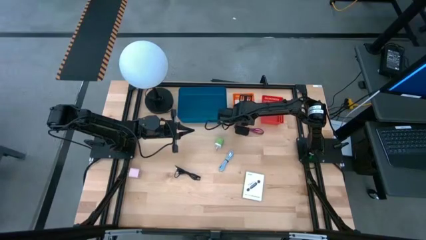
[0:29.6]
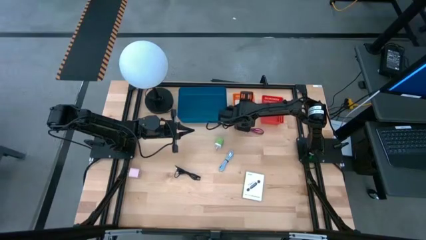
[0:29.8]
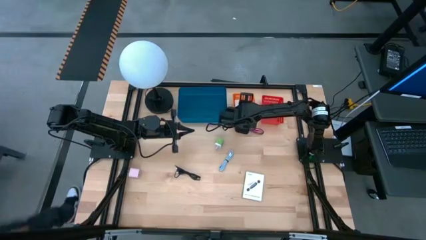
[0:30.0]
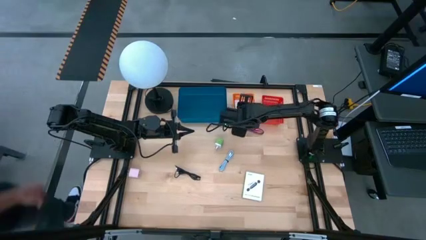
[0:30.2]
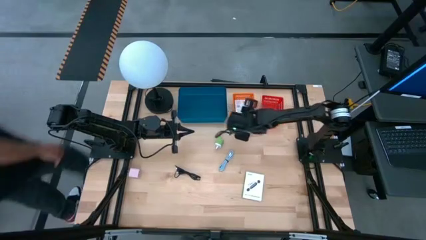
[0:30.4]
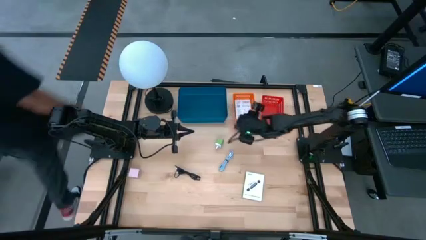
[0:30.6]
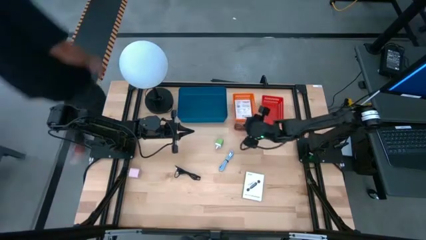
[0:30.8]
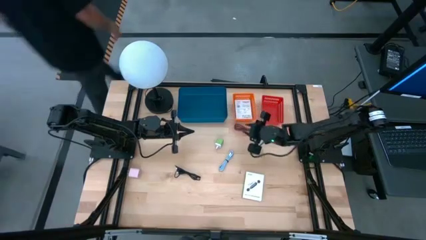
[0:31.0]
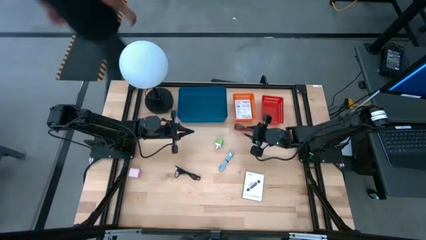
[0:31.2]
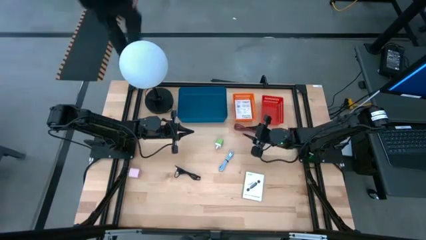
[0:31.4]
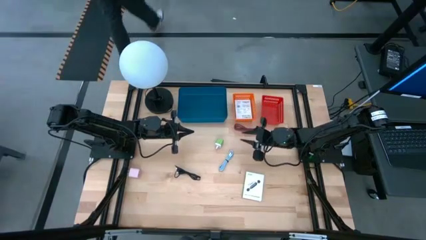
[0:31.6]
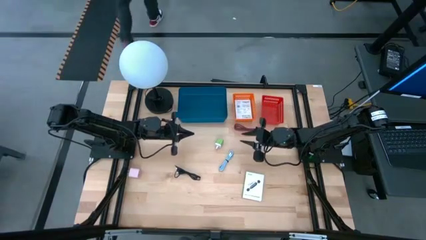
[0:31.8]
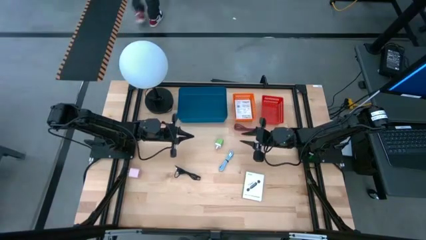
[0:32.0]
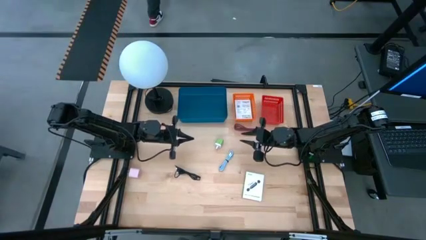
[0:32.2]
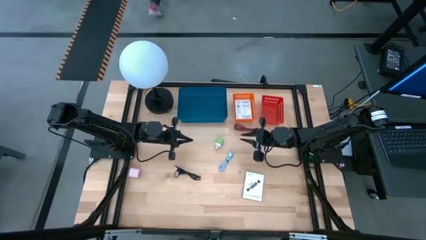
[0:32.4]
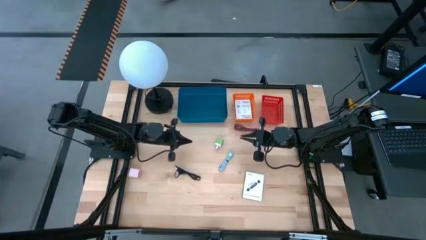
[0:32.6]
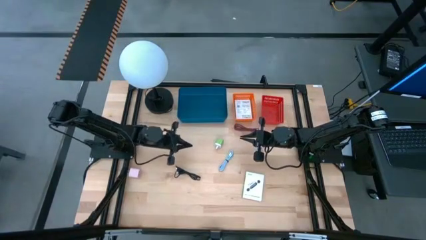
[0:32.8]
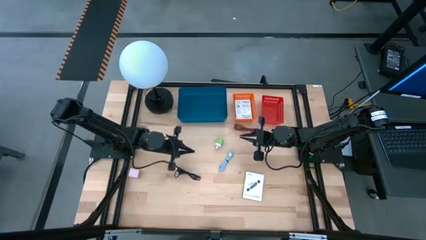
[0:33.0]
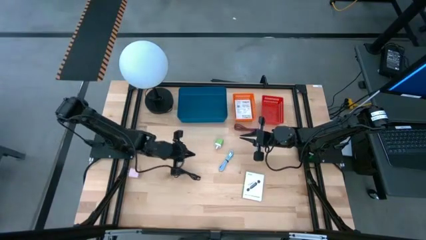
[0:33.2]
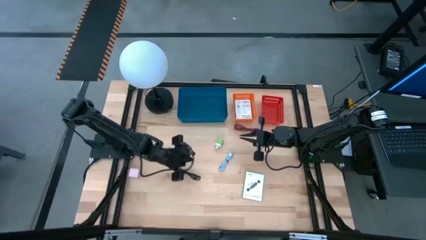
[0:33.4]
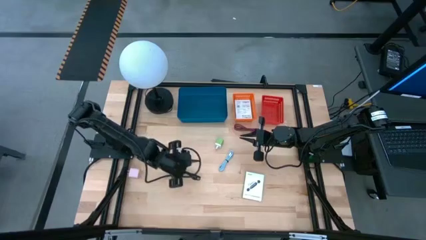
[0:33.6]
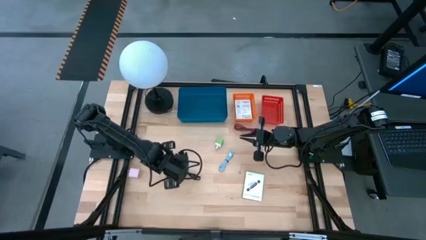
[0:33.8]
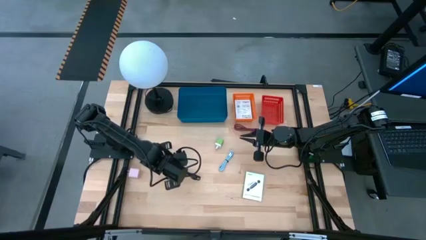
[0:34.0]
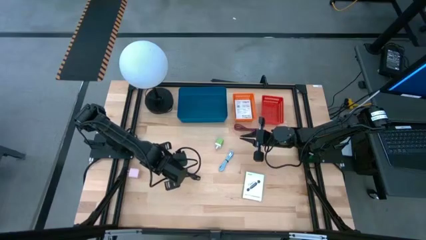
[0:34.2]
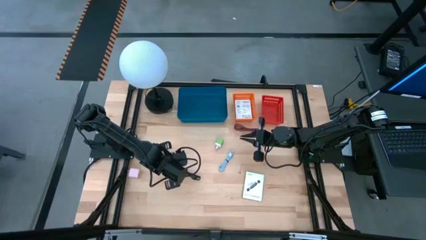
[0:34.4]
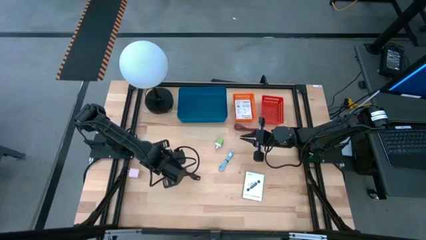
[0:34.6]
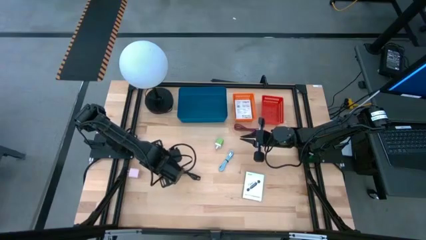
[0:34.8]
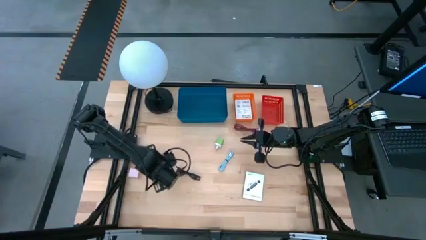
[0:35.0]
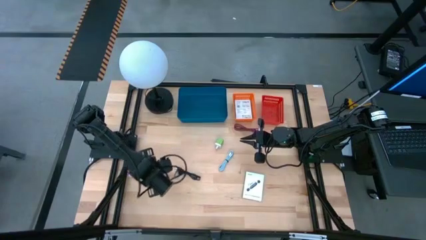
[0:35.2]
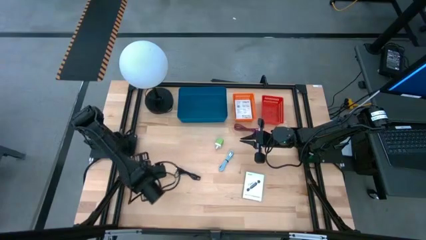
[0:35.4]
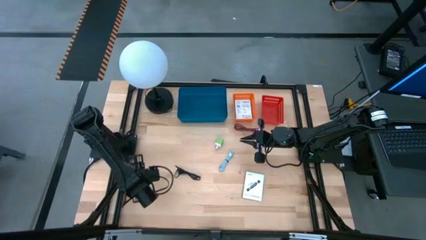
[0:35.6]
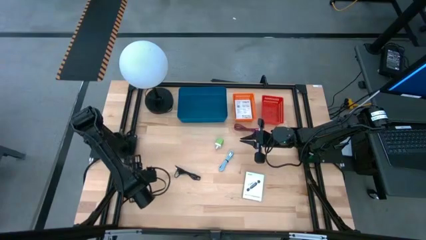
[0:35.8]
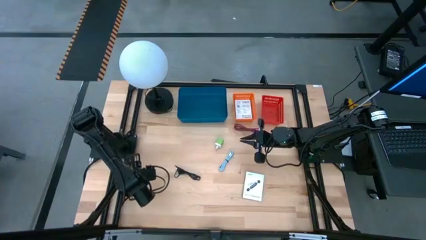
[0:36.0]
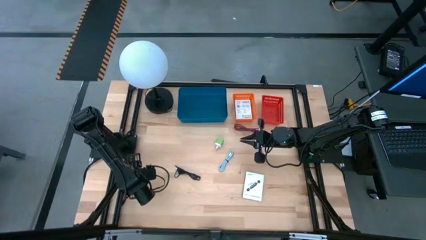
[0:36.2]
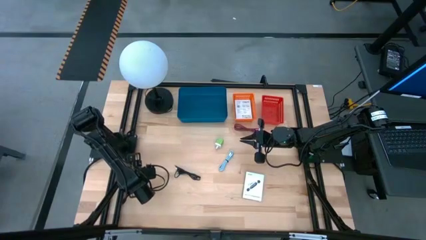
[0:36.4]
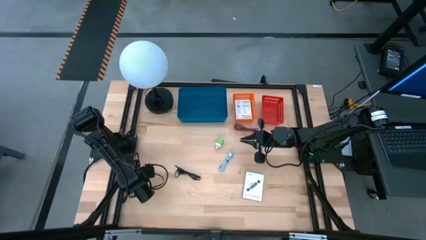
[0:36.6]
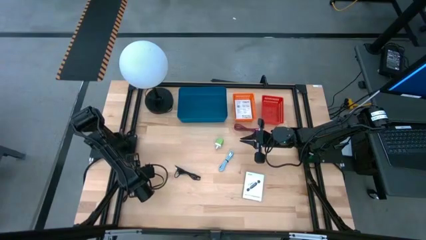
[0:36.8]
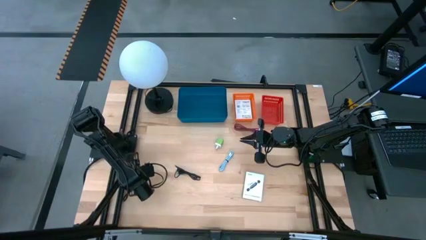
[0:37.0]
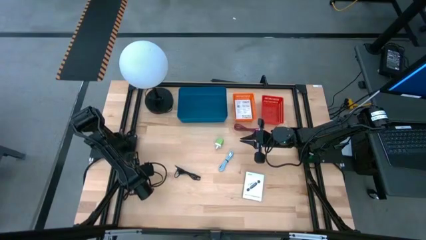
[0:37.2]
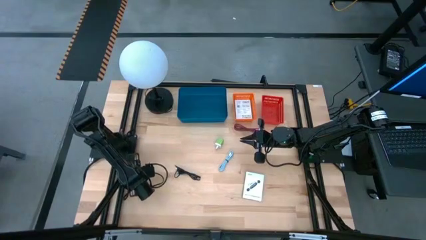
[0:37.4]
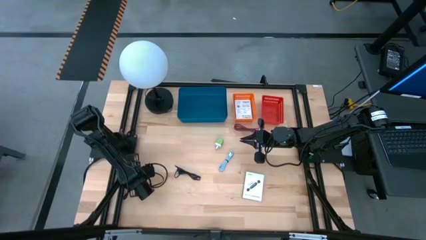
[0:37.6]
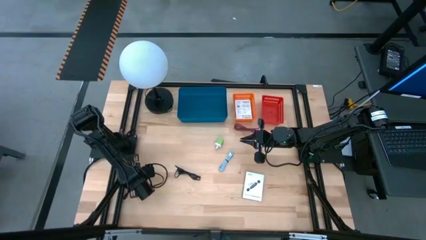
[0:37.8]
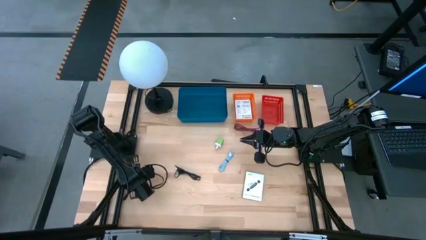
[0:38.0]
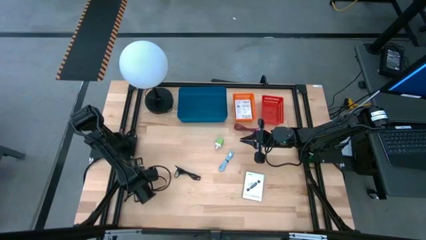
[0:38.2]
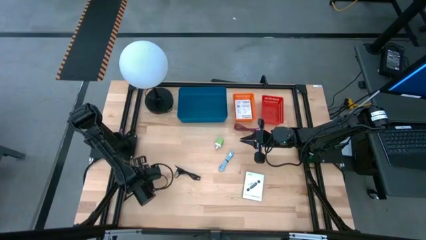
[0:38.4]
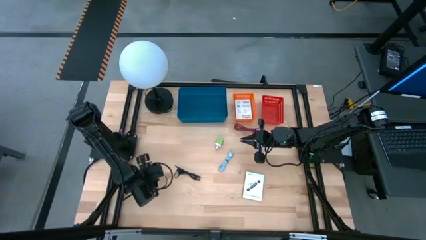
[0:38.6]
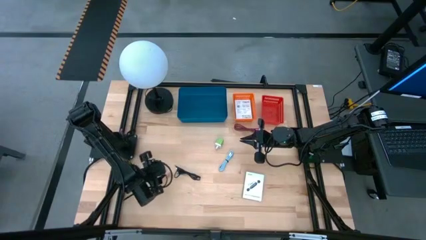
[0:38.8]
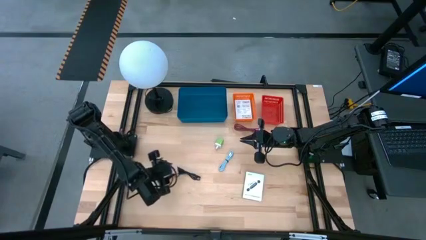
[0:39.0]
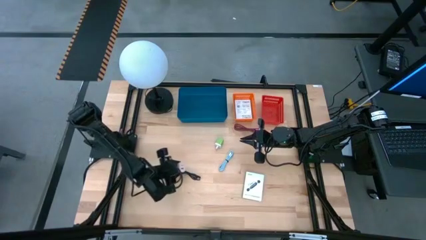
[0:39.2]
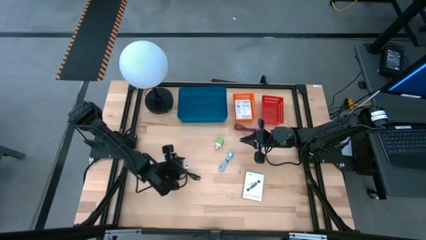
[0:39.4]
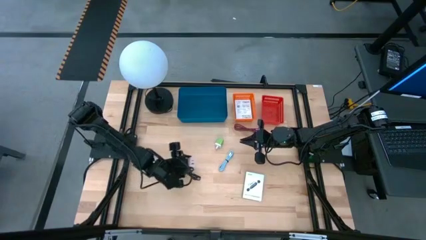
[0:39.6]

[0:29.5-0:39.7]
Task: Pick and place items into bin
Put the light pink charger adapter into the red bin

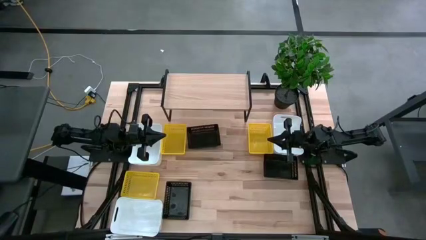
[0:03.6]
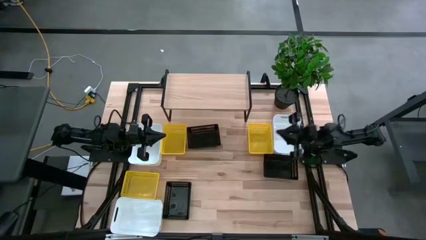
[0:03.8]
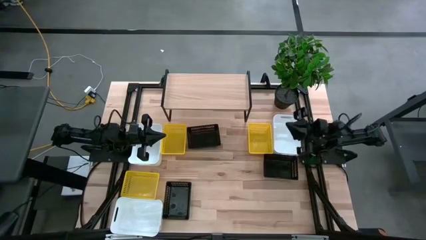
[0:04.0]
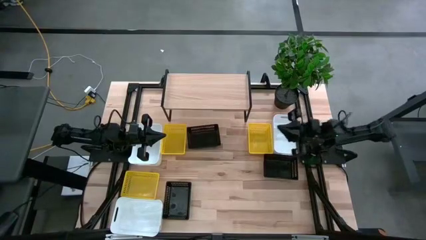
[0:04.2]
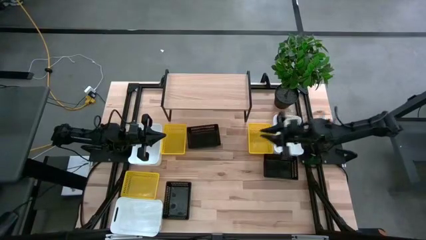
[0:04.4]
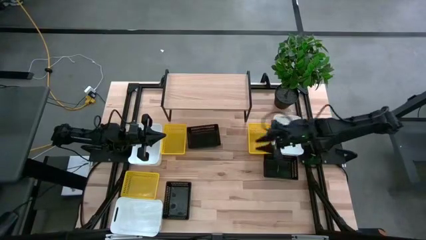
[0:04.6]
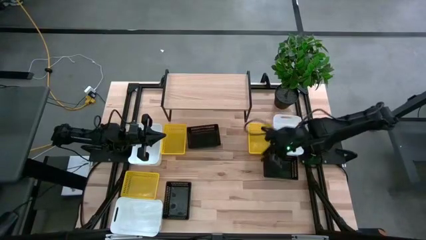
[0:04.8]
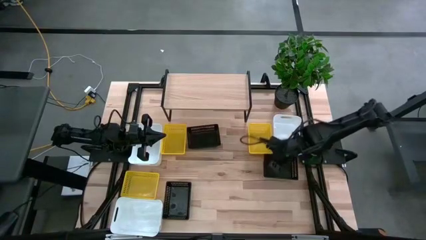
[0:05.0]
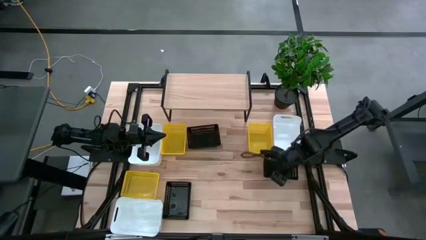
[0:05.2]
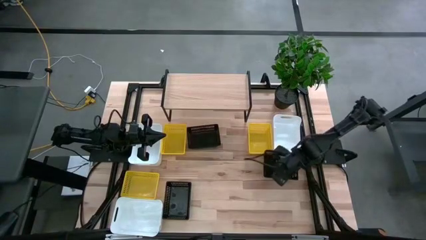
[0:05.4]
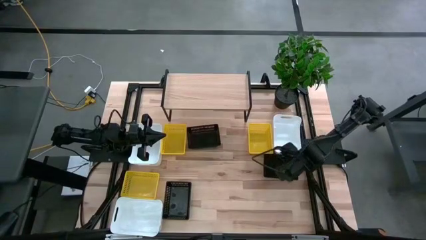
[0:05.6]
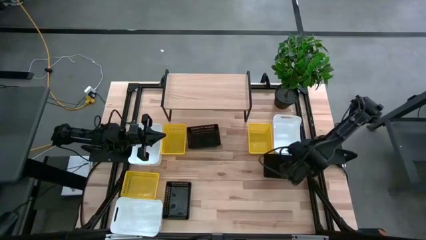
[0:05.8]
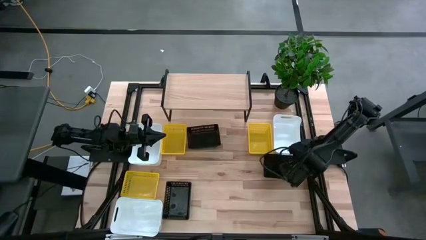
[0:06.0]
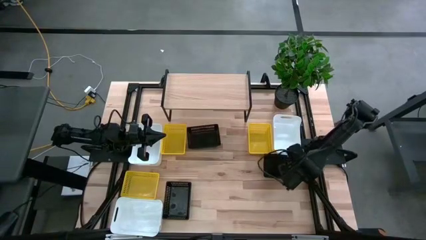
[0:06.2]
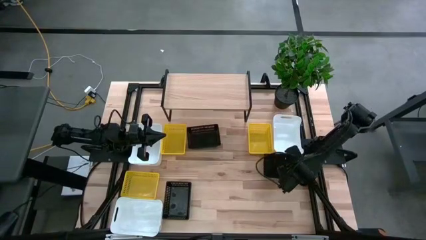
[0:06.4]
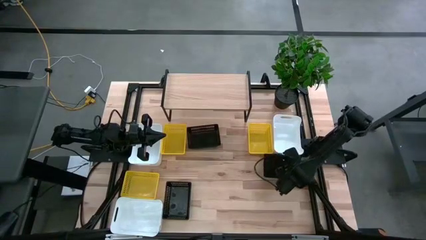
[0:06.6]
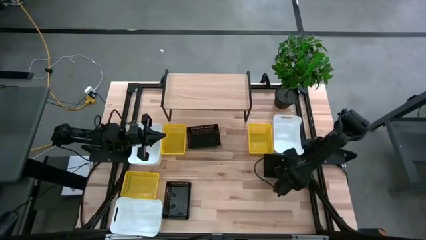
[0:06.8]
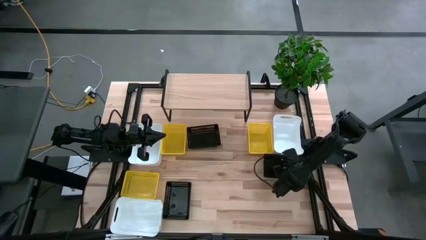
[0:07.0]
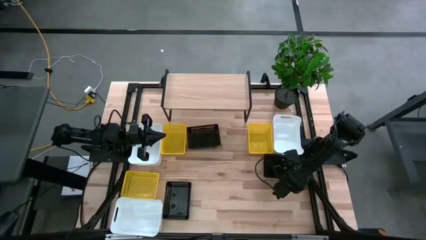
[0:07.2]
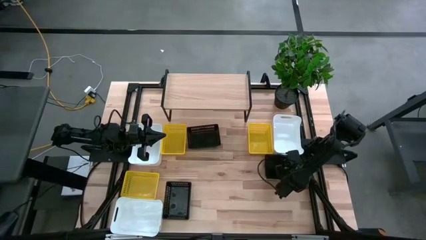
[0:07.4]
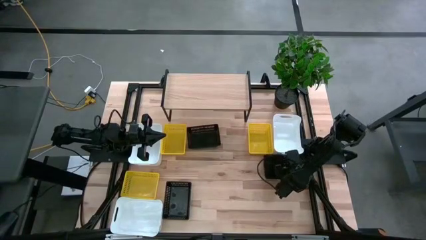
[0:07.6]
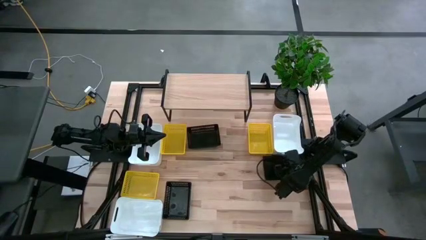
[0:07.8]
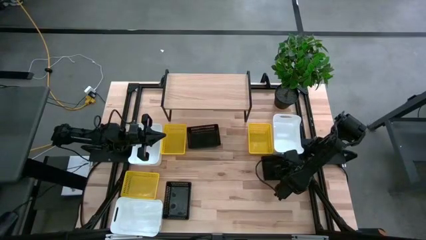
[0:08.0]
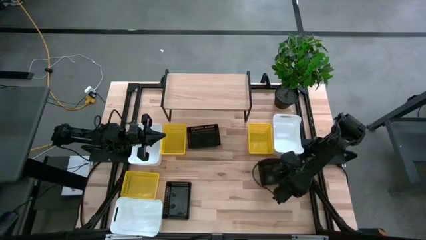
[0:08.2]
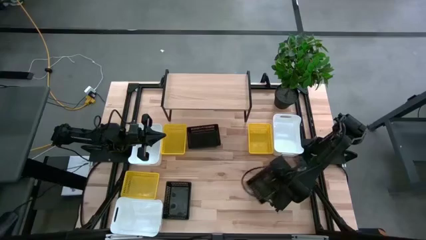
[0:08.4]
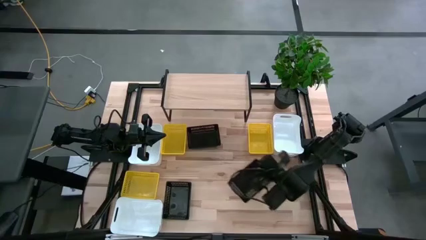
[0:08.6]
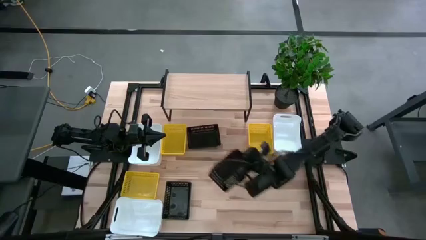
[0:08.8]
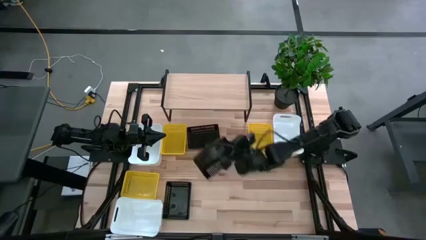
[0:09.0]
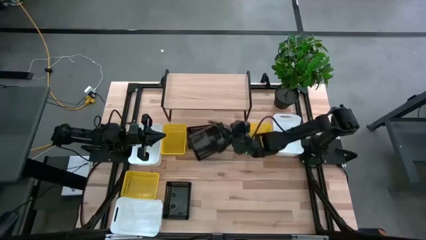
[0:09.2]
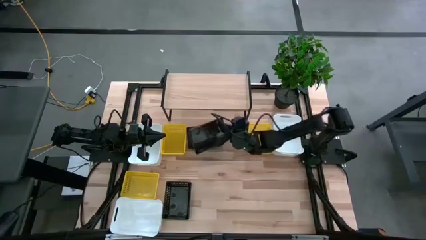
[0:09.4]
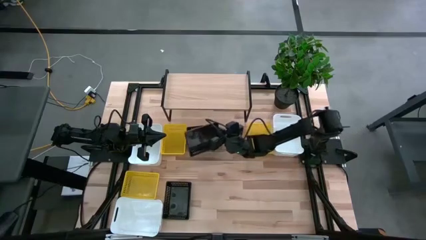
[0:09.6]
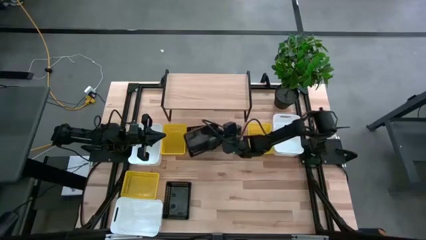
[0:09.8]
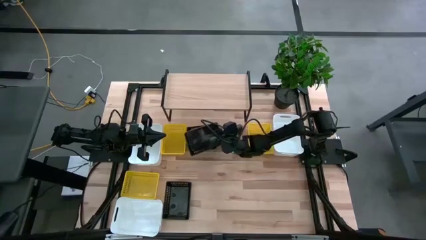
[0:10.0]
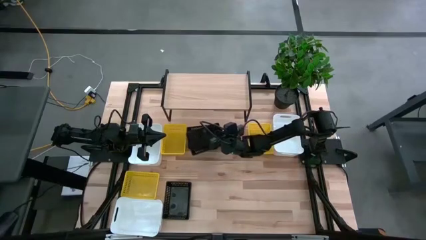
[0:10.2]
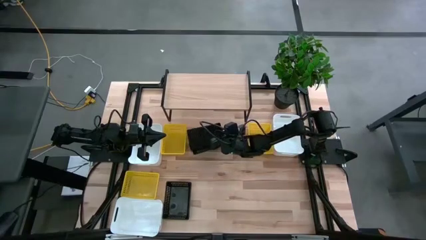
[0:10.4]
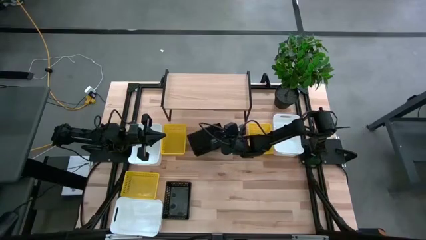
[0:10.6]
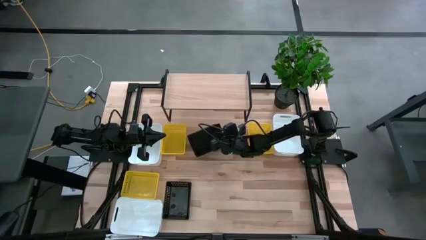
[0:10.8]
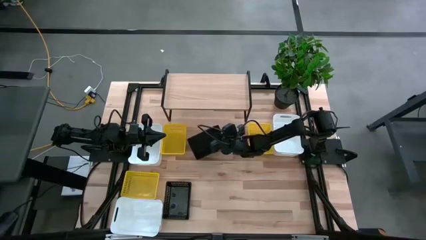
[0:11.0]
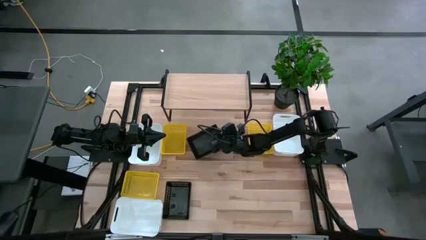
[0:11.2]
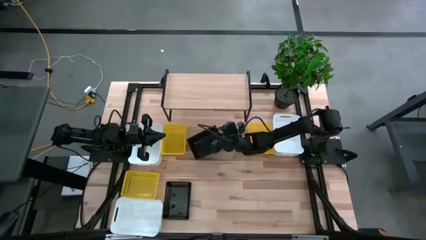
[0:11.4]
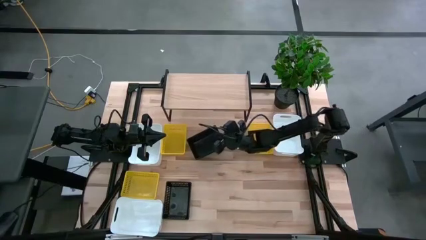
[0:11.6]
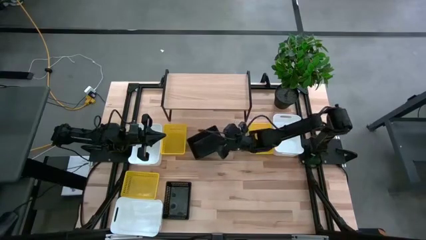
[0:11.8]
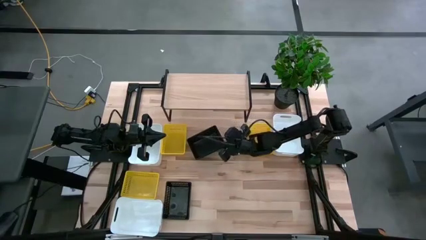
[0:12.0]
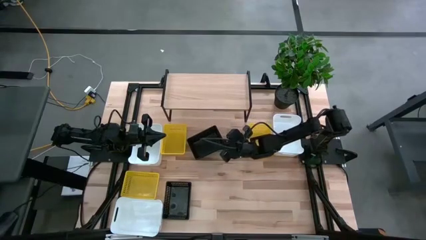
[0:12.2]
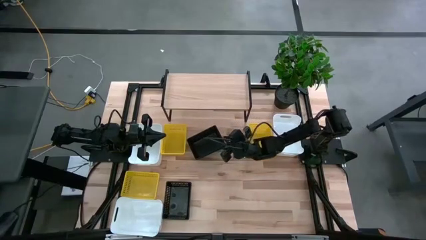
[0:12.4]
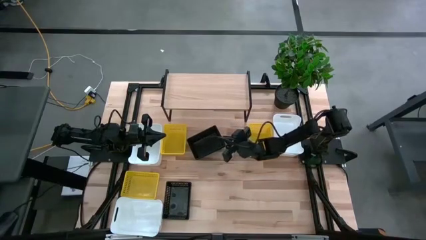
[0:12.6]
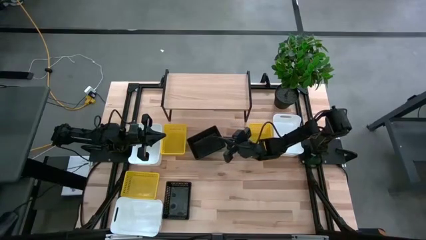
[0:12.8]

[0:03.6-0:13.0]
Task: Stack baskets on shelf by color
Stack the middle black bin on the top black bin
